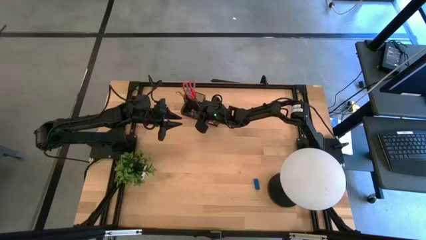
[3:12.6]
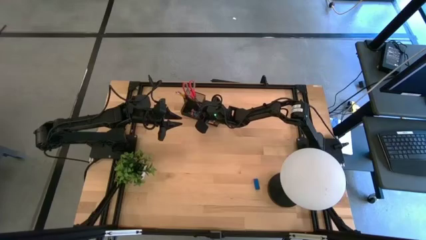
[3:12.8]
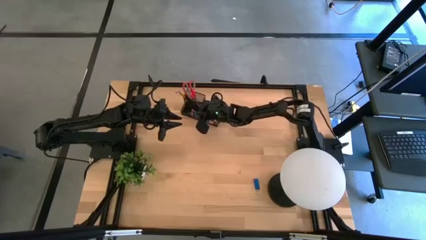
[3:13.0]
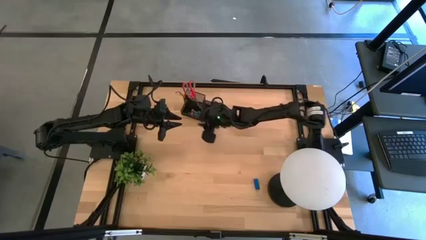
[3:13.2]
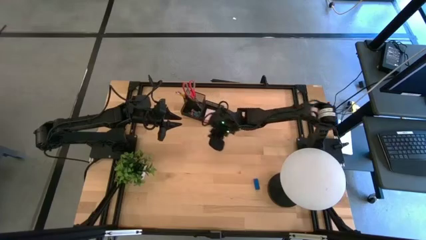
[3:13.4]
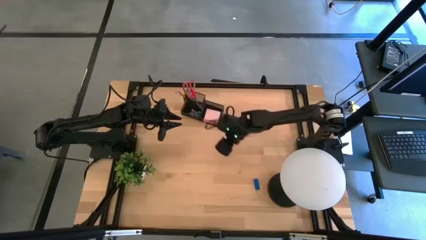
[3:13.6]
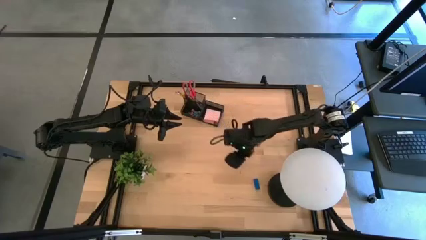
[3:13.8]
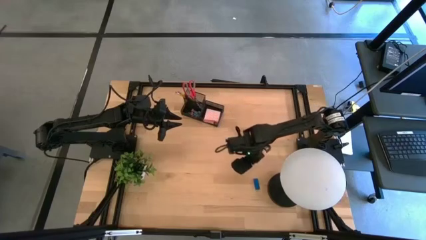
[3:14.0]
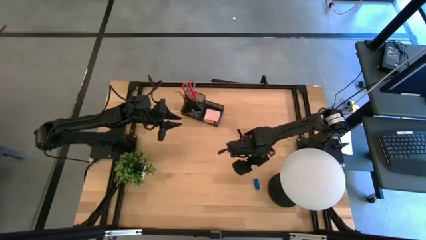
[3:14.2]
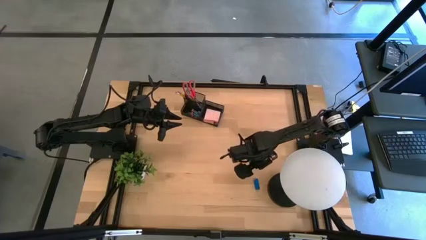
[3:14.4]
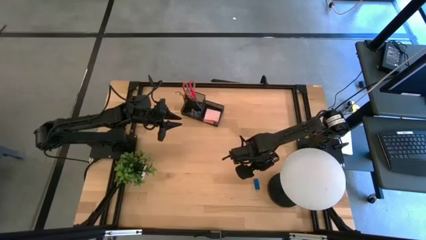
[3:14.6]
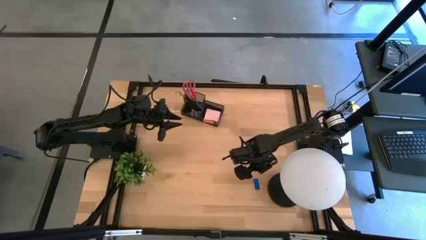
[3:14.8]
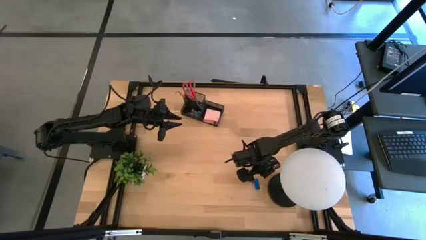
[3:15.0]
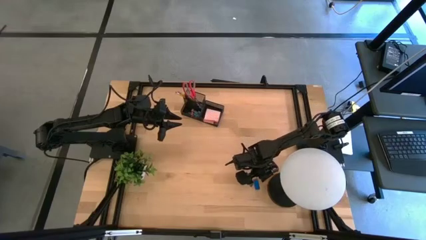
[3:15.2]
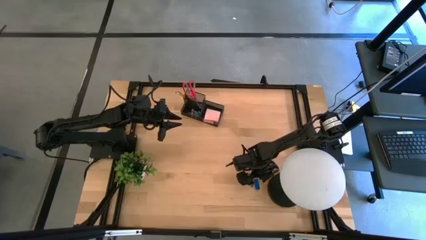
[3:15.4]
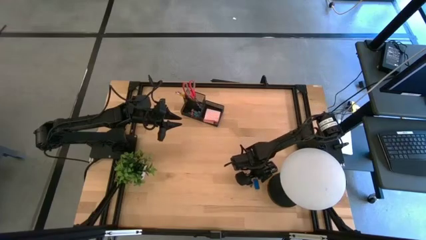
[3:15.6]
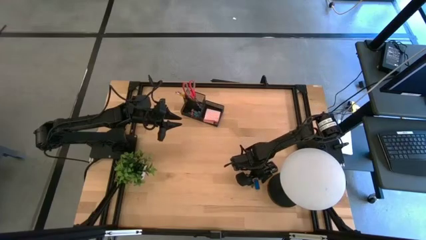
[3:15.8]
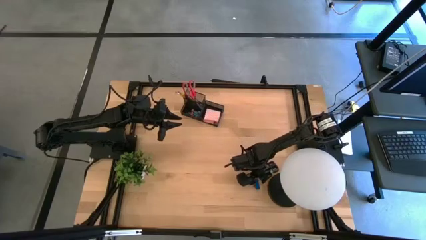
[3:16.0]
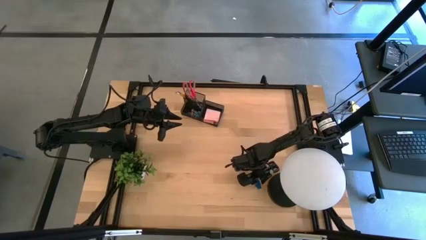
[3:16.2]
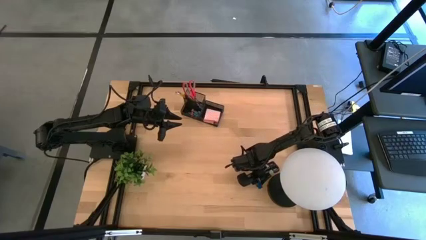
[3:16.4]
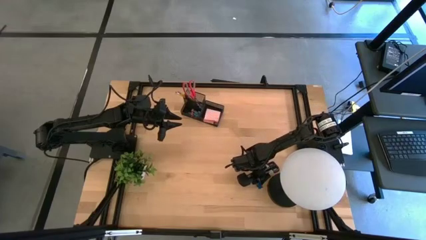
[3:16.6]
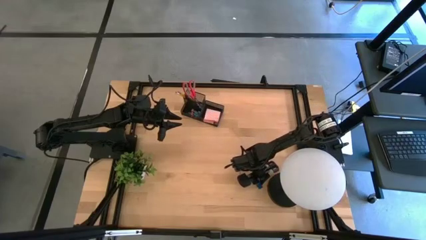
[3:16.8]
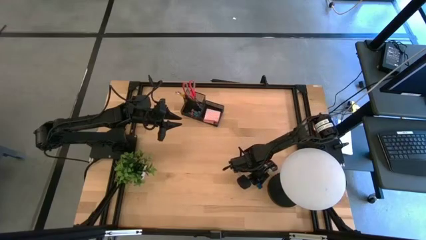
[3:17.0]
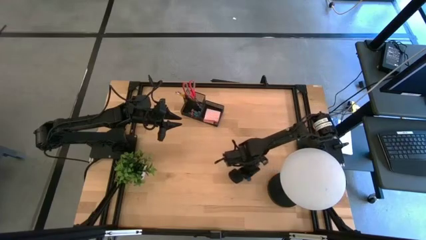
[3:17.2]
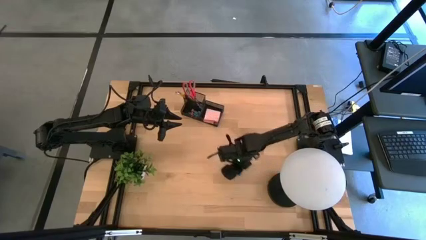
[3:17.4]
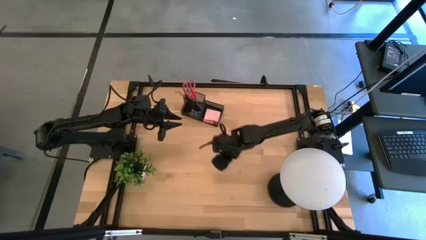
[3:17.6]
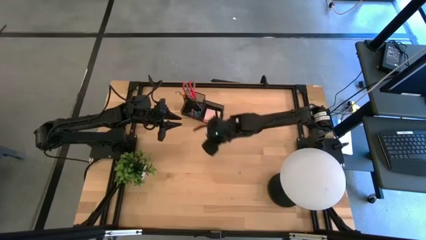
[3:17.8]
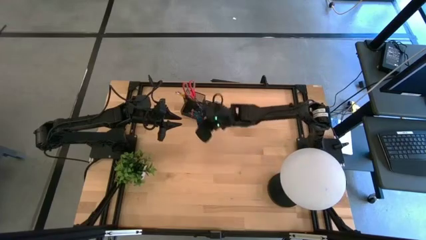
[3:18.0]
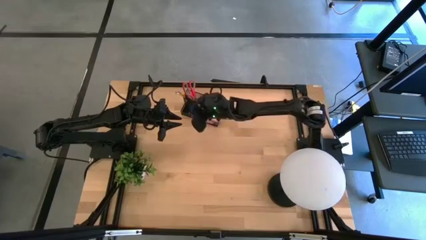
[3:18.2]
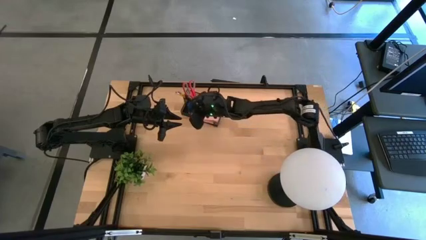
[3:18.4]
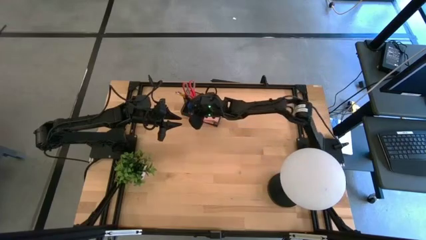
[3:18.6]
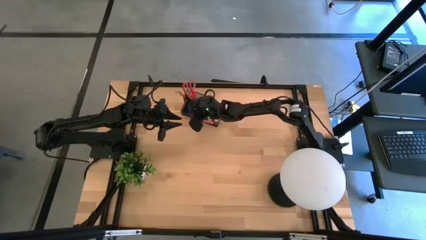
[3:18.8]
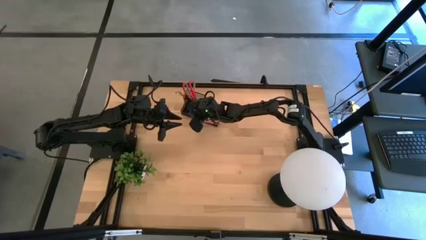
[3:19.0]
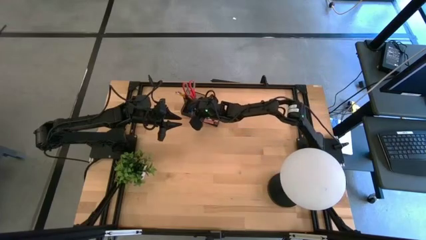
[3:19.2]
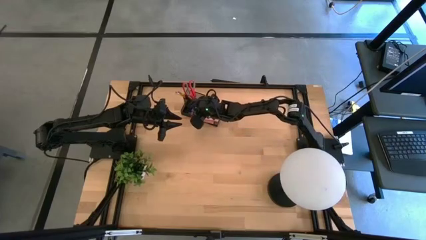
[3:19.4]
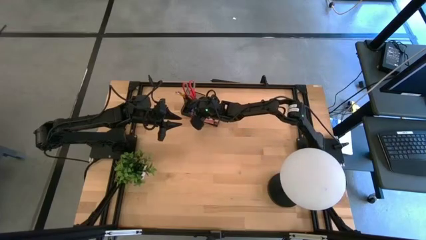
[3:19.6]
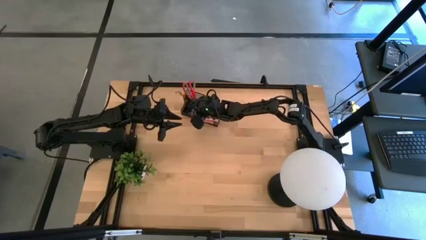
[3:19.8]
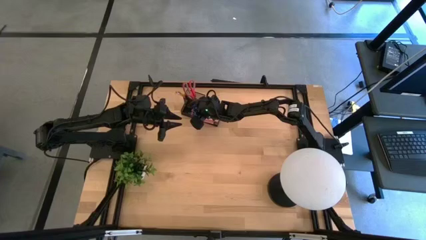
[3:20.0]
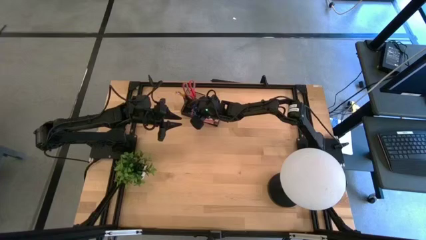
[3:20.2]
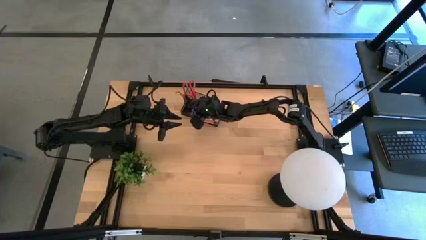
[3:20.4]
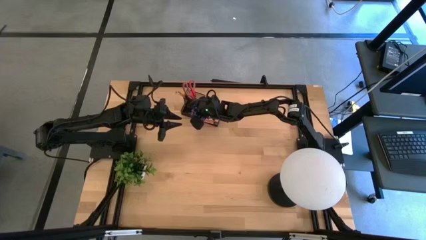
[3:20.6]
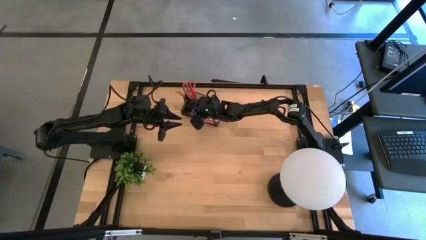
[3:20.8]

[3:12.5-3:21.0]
Task: Pick and place office supplies into organizer
Put the blue eraser into the black desk organizer

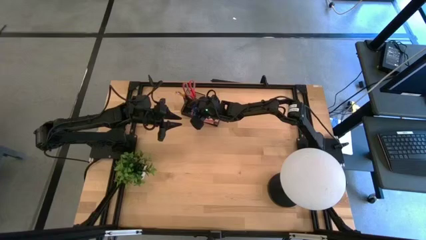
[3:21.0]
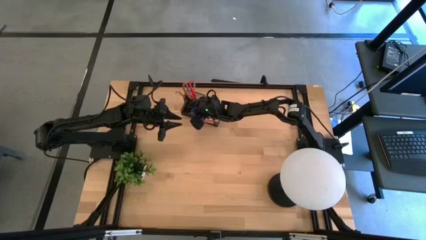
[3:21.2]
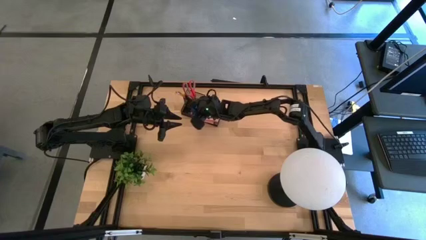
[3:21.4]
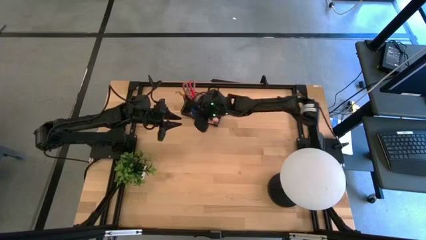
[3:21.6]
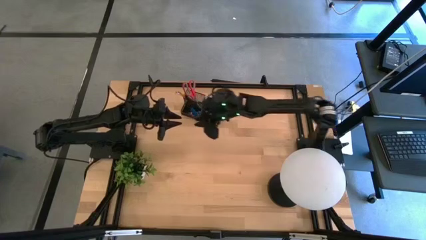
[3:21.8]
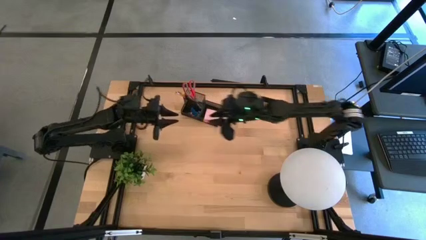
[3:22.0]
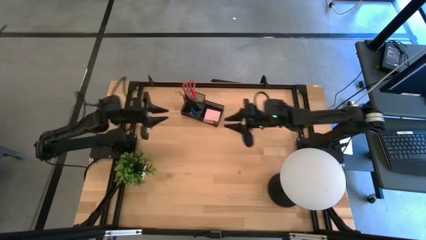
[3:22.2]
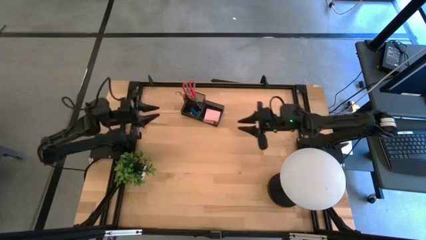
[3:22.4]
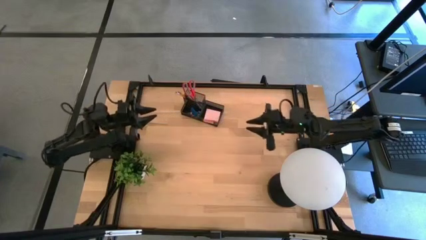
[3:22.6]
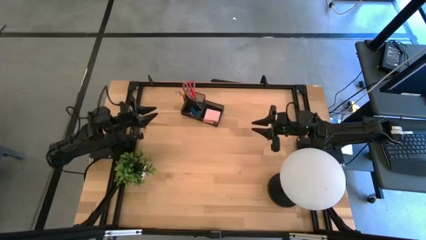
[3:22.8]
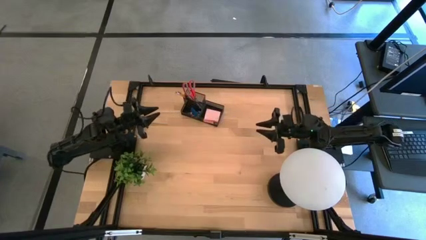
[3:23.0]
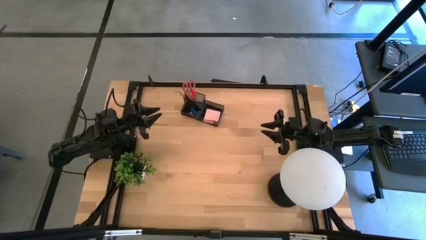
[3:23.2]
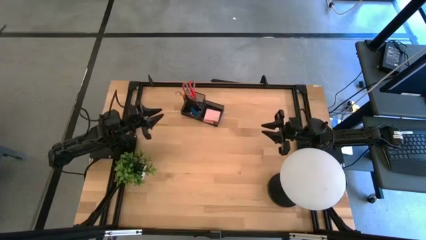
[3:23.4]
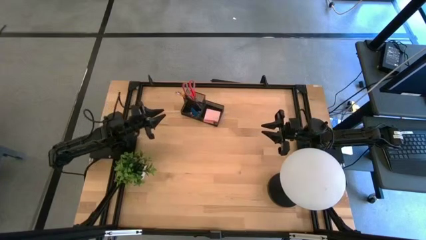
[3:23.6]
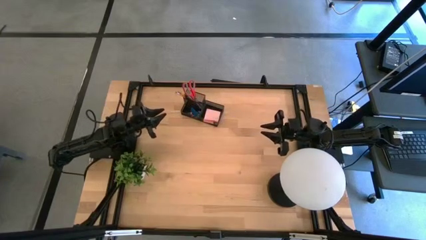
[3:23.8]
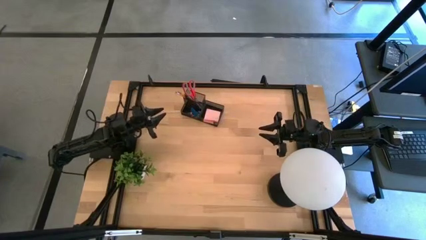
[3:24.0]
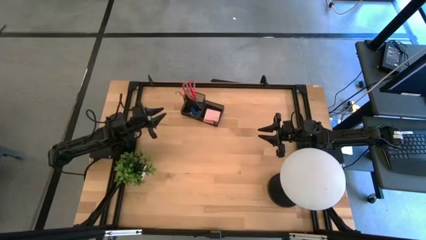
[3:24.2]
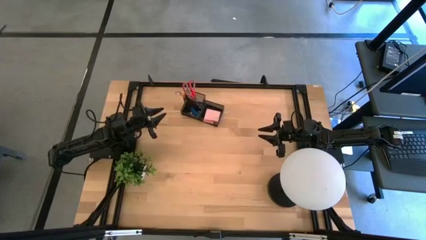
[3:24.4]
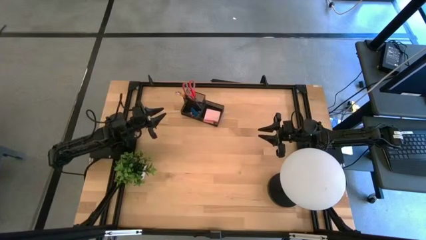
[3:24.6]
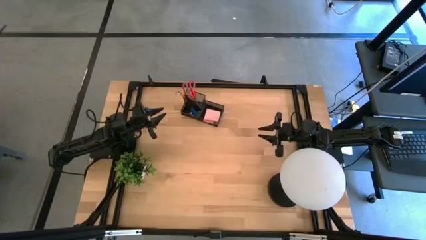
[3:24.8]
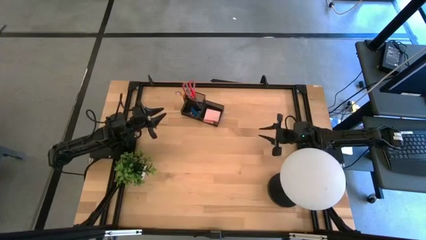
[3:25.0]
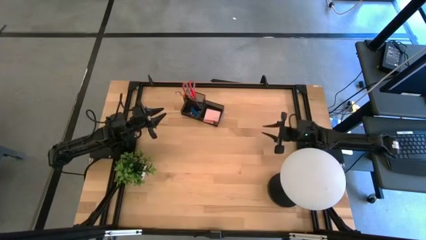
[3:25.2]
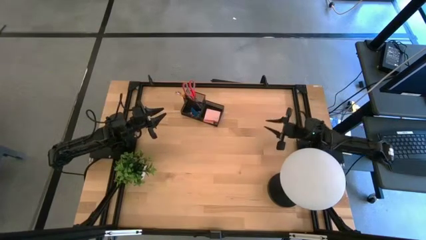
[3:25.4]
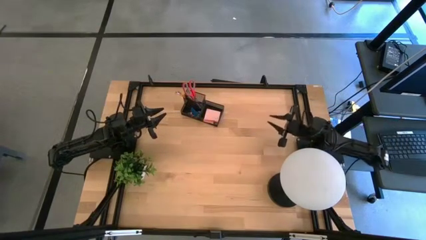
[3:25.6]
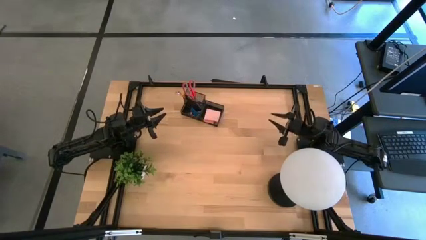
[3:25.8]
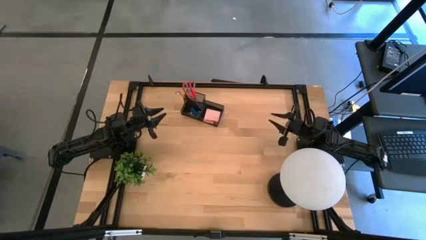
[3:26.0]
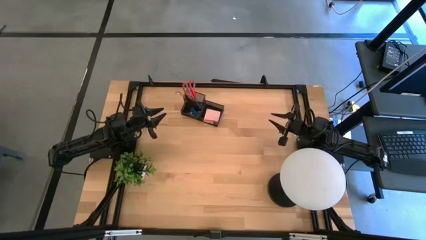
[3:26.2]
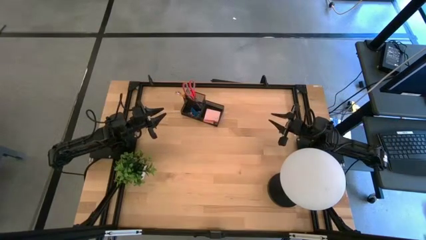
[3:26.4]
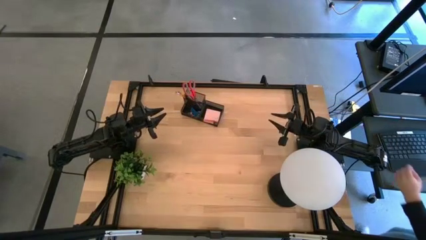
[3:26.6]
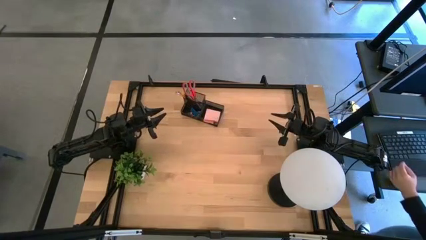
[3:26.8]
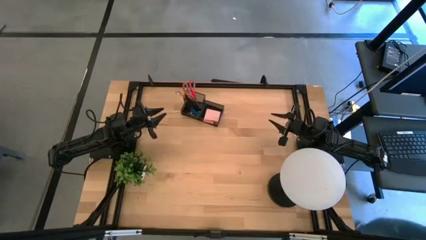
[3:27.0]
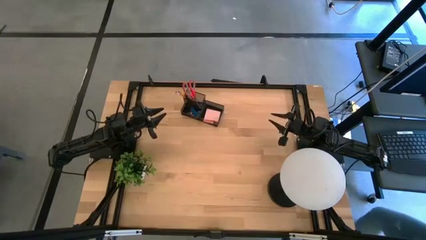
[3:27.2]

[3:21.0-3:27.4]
Return to Home Position
